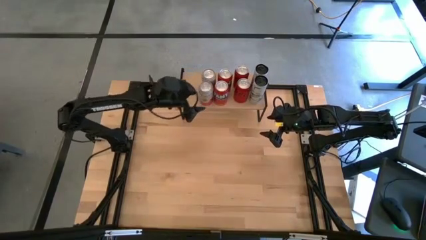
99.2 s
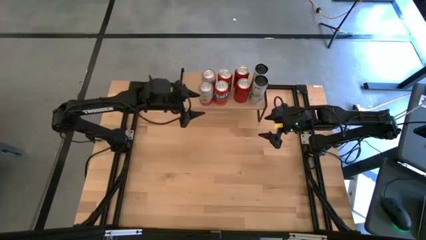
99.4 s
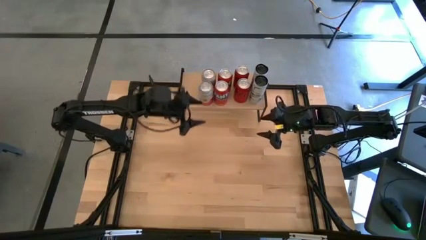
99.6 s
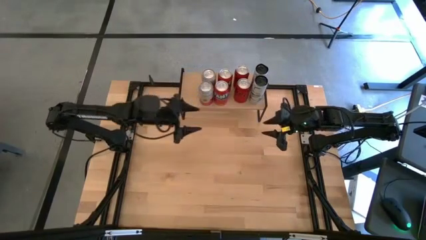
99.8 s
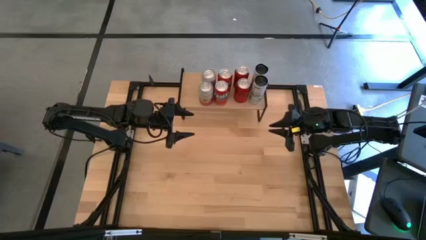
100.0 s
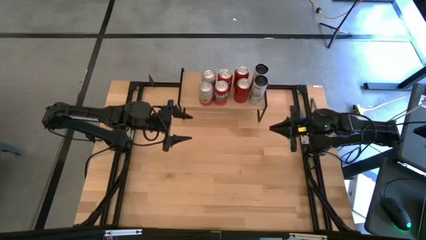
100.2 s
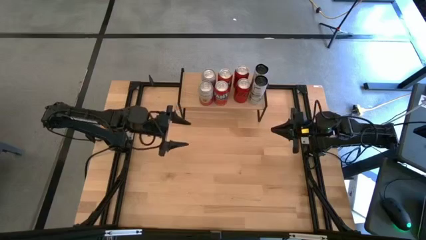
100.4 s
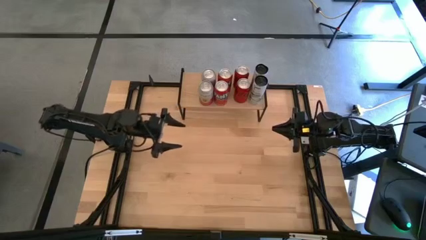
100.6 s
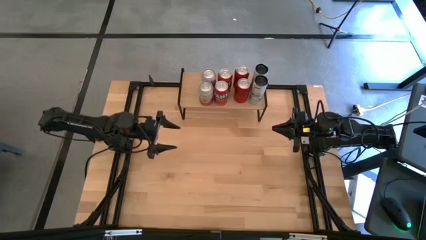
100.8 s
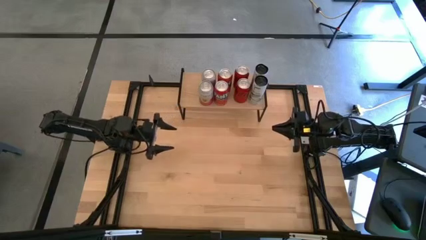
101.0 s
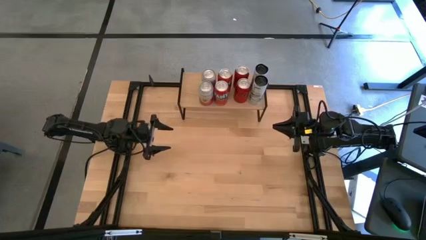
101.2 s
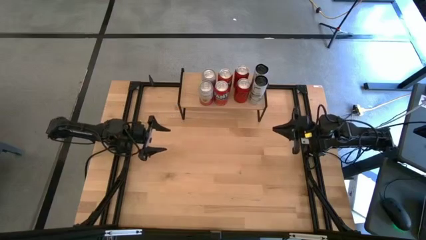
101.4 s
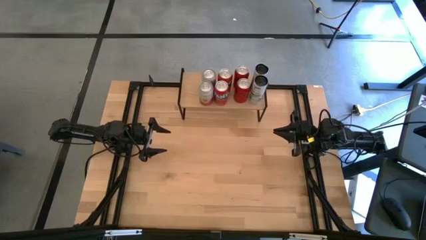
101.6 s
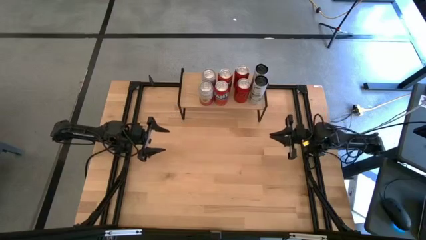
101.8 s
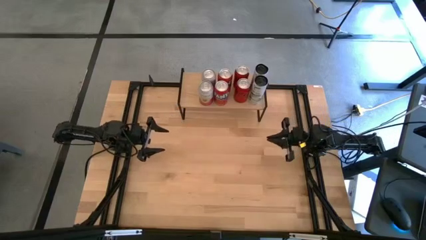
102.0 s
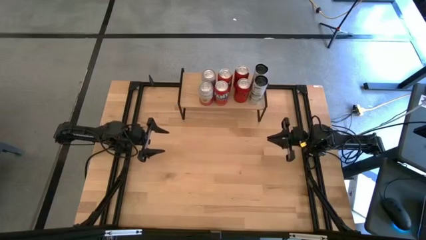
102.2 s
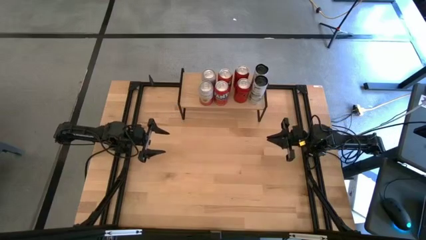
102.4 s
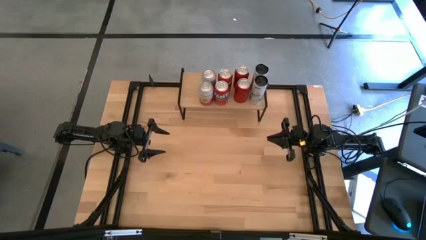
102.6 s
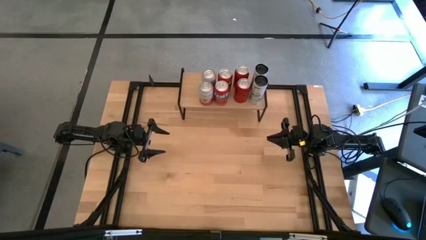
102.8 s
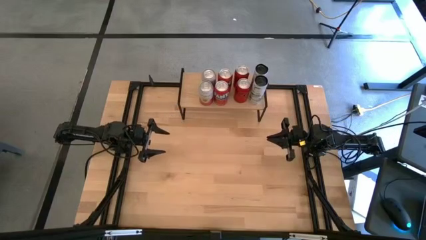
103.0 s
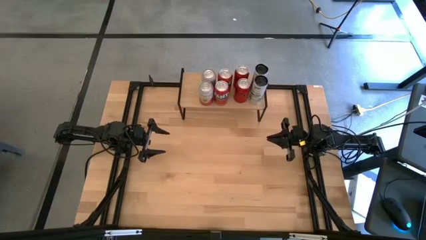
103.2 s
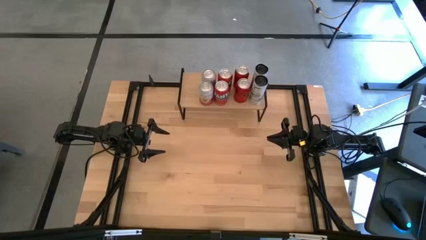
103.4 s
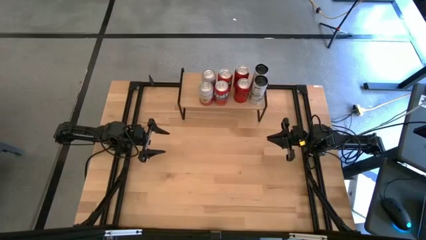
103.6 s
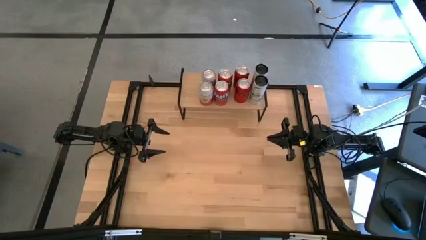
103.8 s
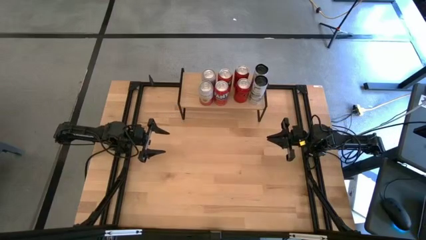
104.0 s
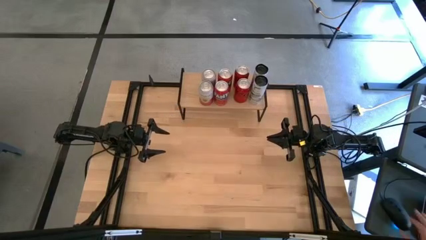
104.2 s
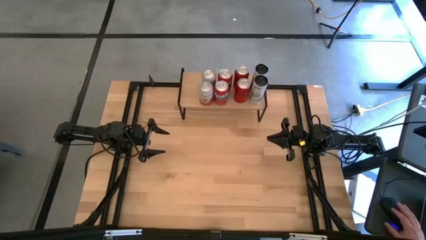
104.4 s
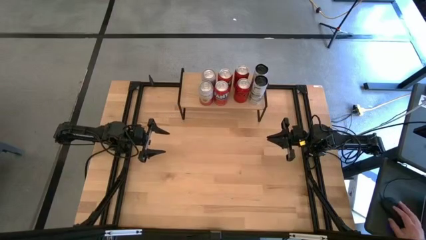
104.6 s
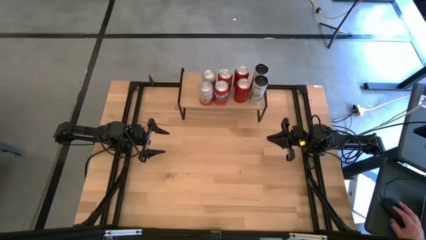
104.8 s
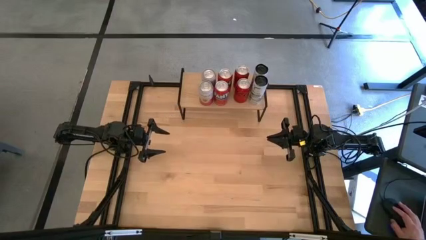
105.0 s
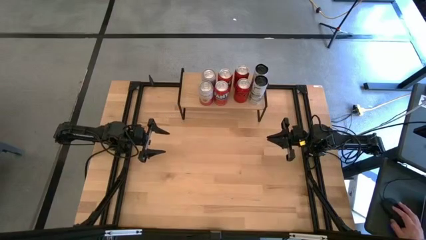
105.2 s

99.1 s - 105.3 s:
Task: Place canned beverage on shelf
Return to Home Position

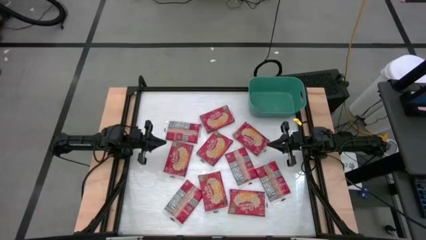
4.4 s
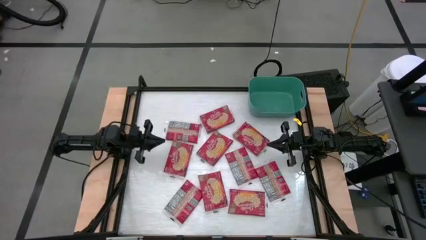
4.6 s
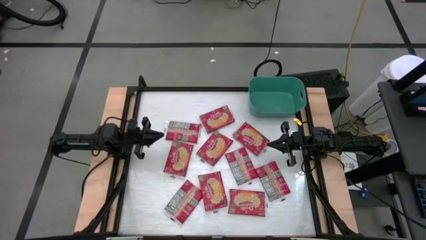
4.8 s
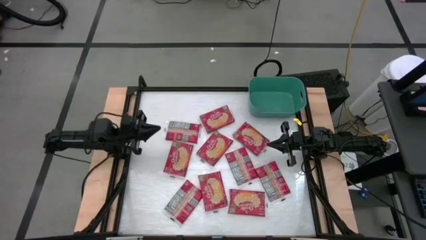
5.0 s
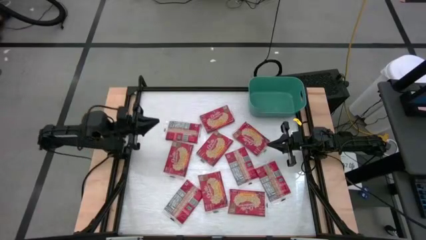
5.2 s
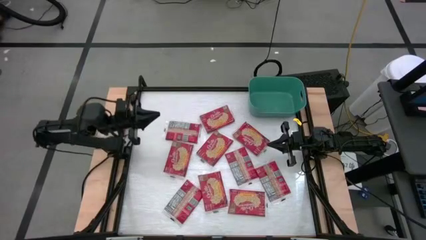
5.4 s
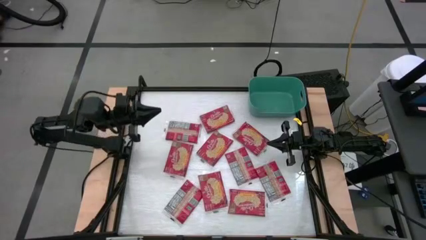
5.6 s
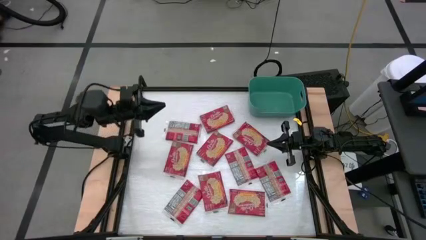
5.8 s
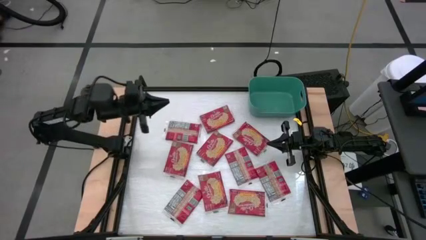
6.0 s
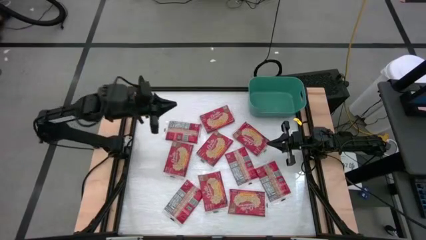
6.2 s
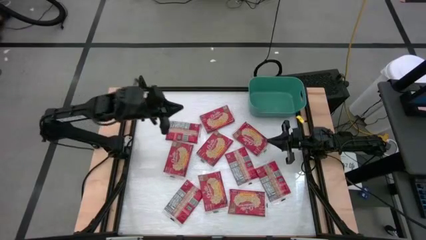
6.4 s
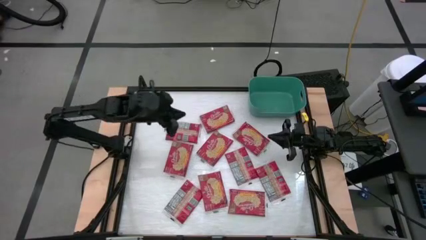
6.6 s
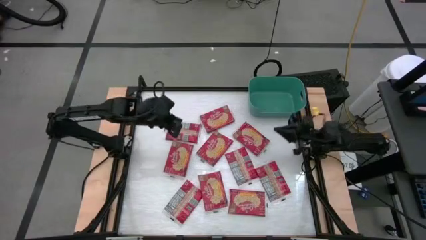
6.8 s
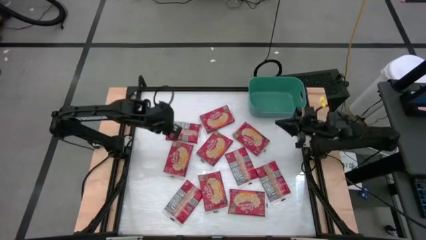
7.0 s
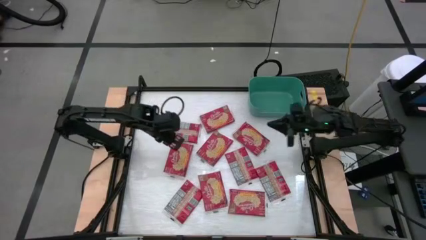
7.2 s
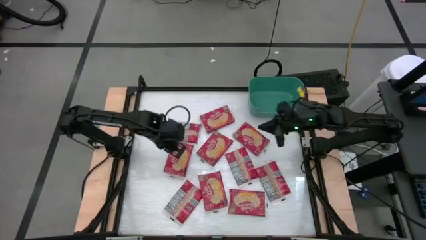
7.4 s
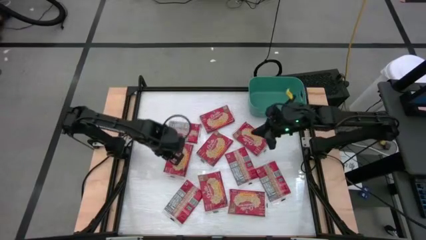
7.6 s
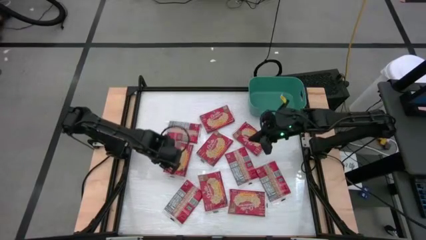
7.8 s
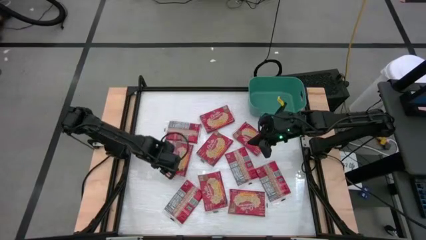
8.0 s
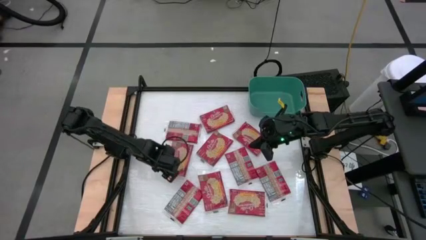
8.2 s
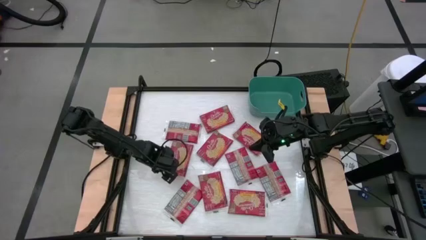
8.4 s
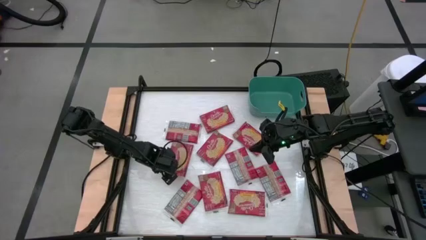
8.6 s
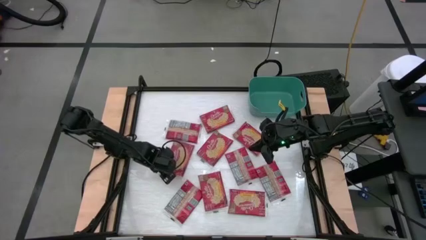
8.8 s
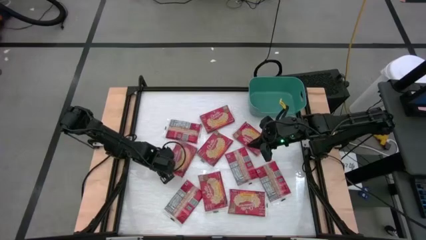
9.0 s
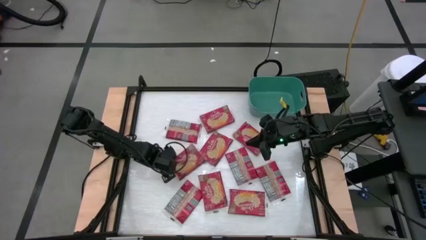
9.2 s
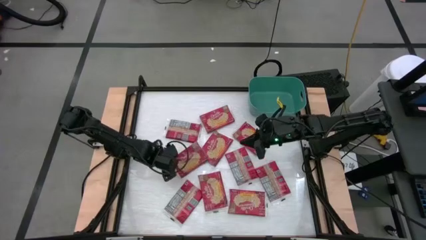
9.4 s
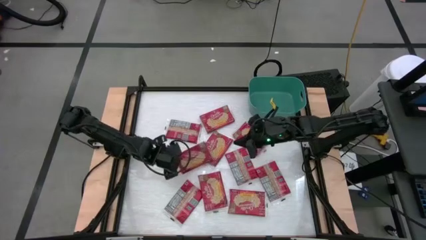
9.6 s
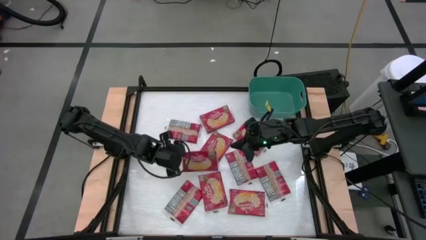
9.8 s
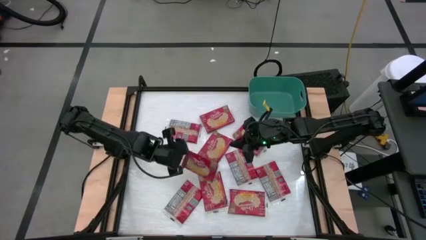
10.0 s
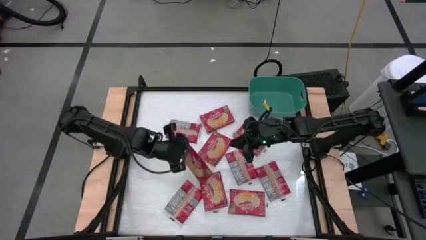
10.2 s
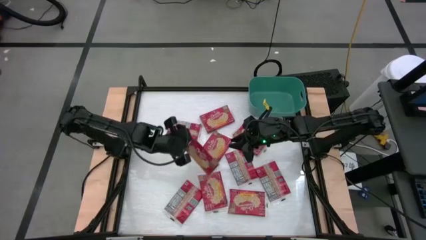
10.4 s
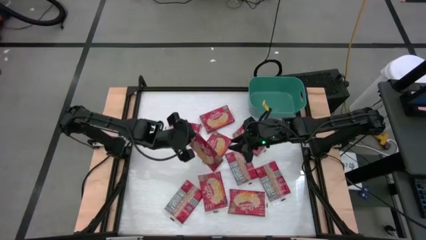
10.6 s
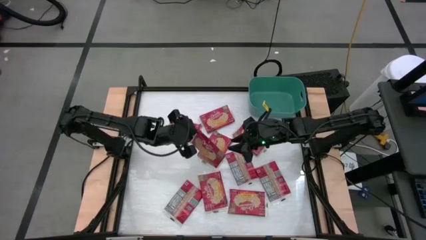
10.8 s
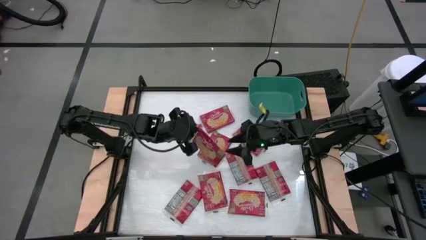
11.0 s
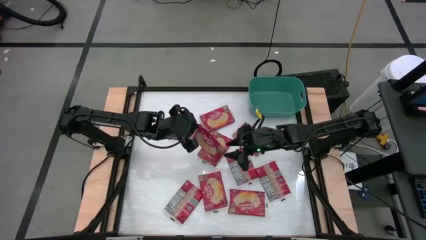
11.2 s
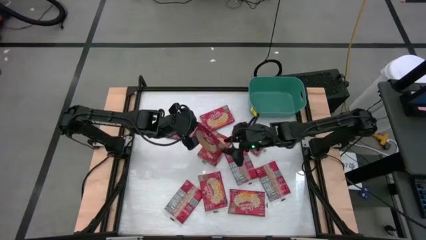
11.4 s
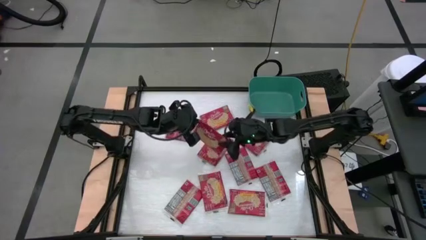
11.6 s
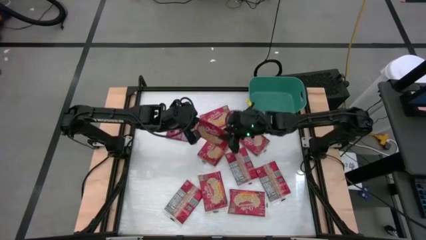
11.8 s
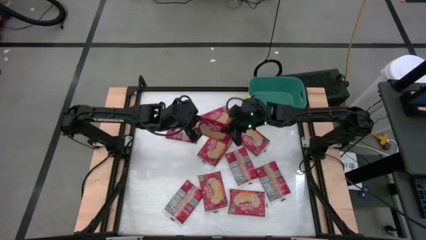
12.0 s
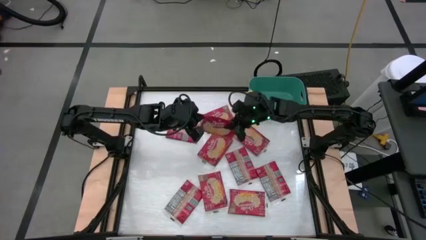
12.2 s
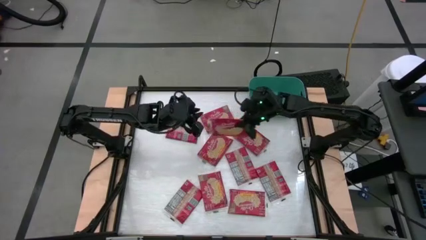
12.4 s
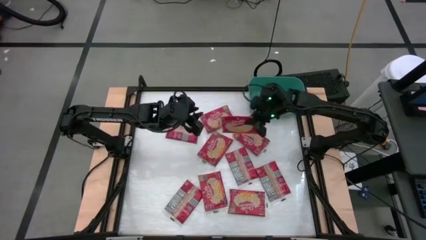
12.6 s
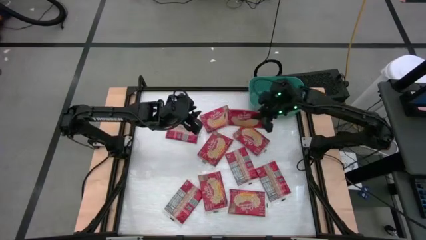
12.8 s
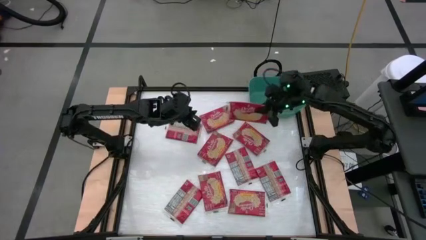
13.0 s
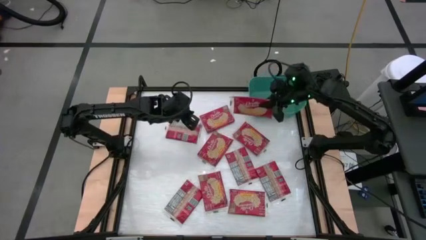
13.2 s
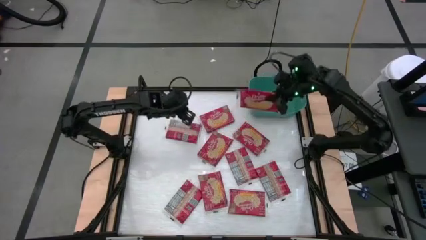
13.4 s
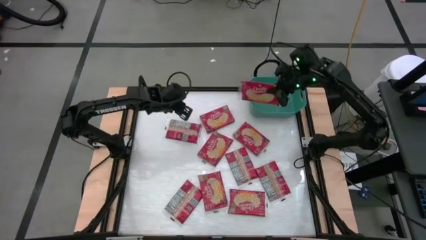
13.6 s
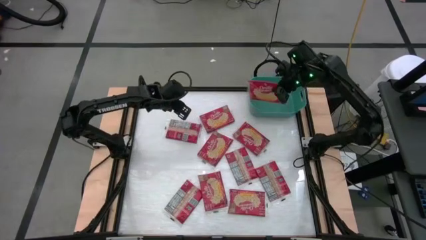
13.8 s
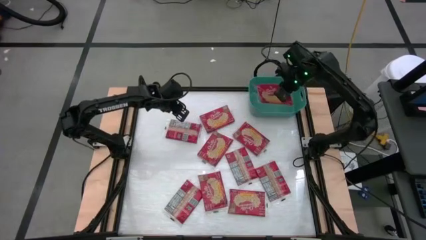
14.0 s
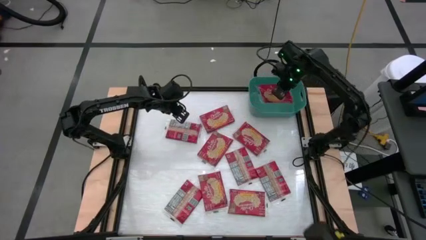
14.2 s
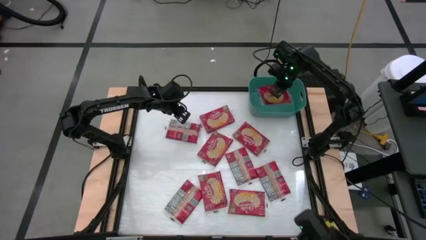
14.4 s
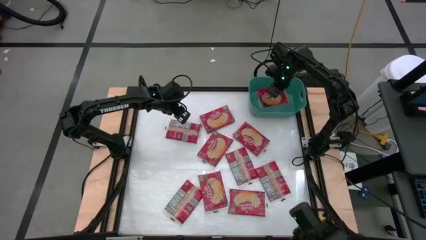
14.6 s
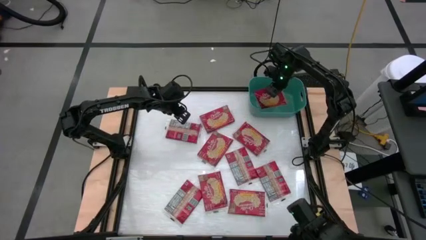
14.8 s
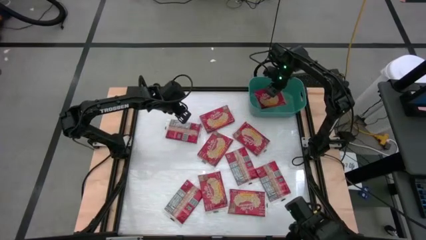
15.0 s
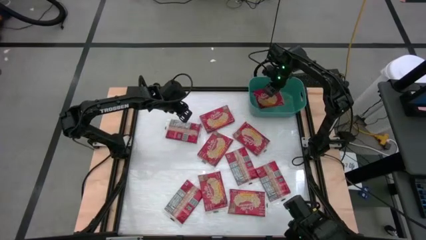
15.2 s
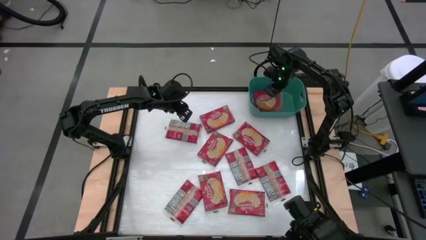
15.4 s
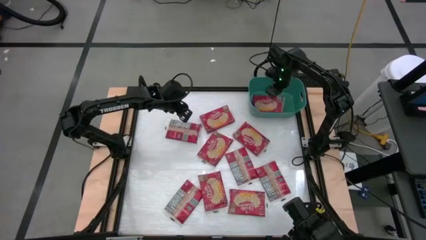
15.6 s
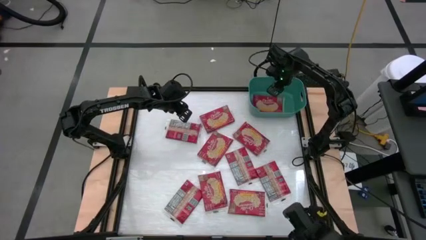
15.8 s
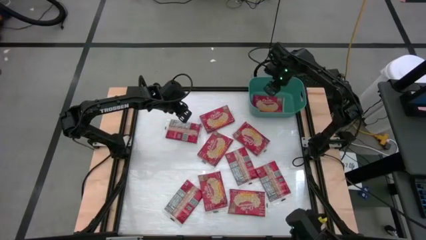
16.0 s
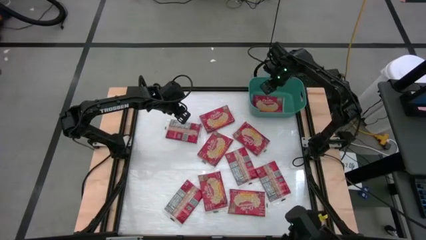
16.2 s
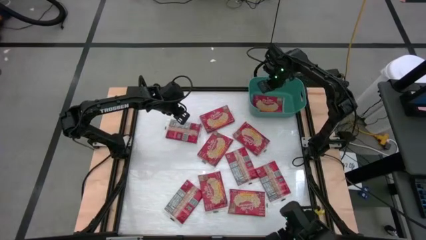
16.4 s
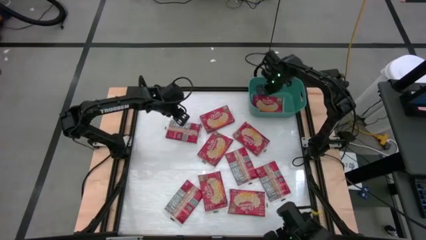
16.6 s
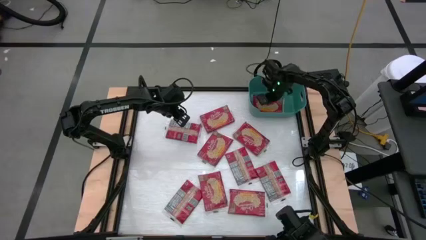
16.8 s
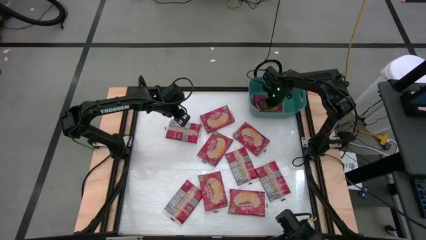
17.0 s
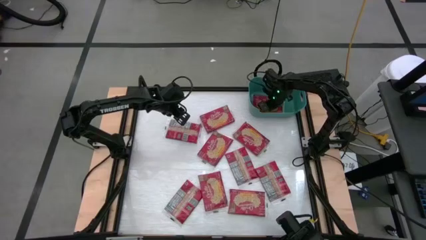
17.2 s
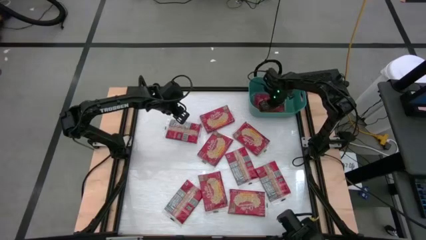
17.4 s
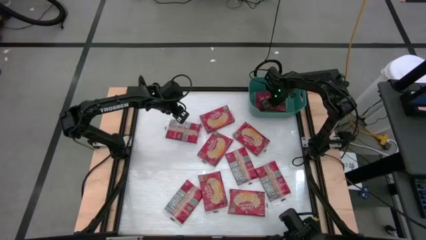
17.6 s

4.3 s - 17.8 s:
Task: Sort popcorn bags into baskets
Put the red popcorn bag into the green bin
